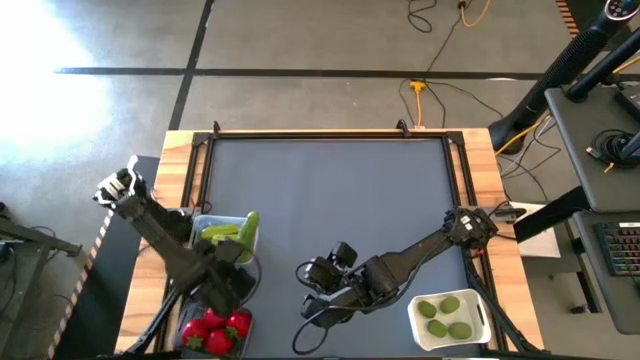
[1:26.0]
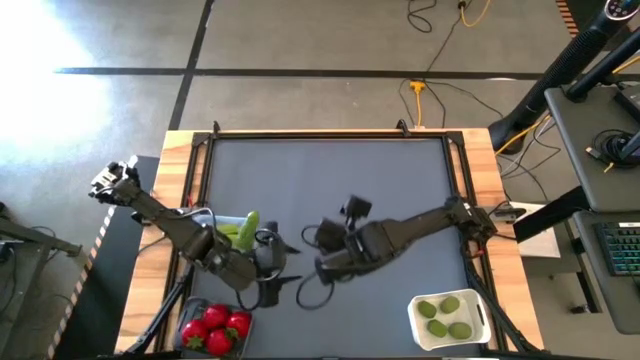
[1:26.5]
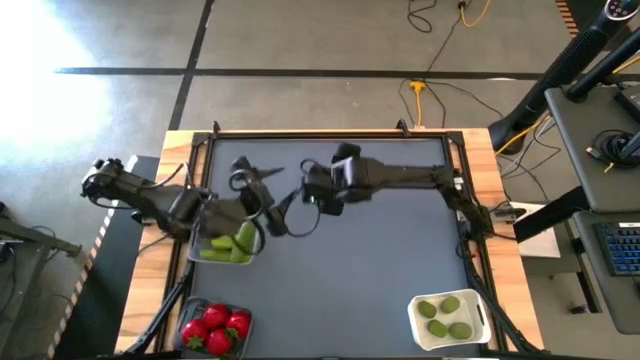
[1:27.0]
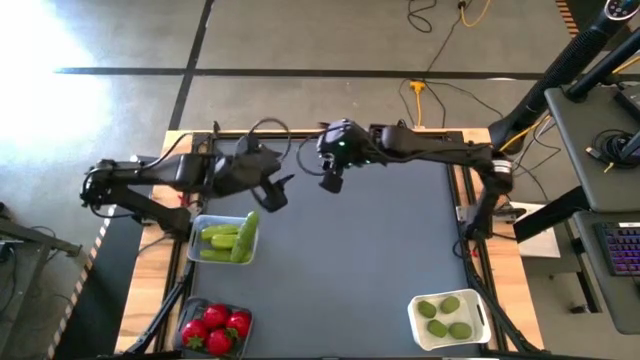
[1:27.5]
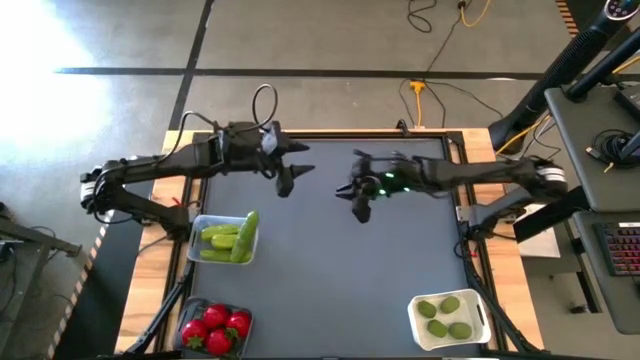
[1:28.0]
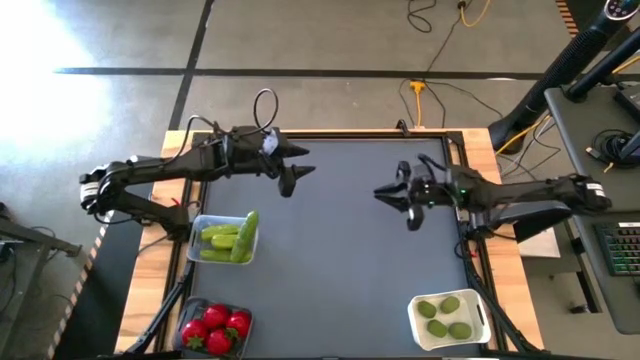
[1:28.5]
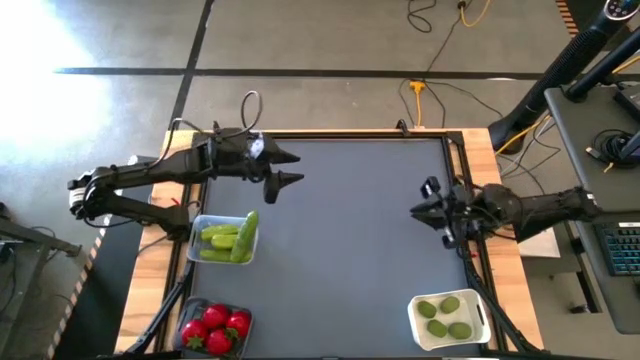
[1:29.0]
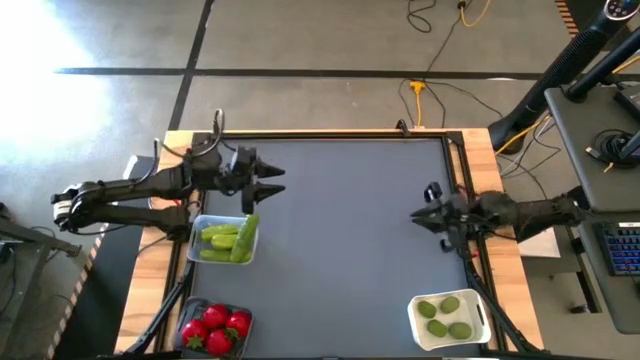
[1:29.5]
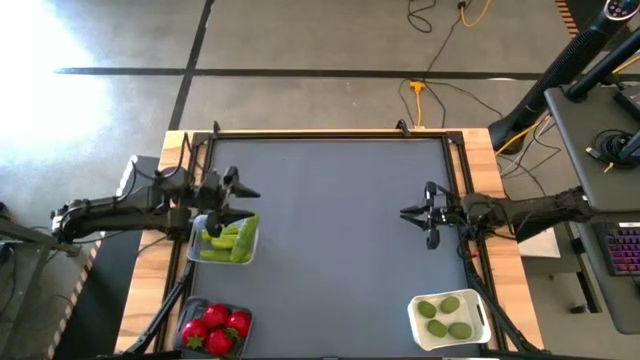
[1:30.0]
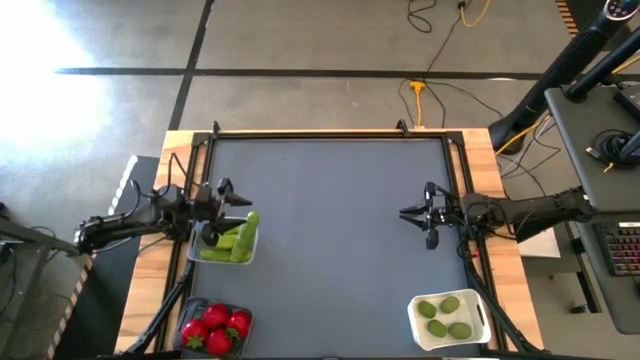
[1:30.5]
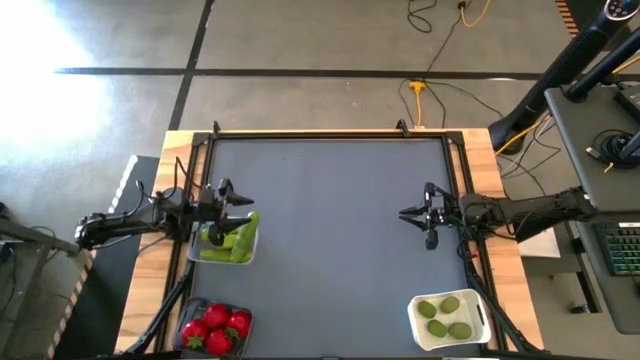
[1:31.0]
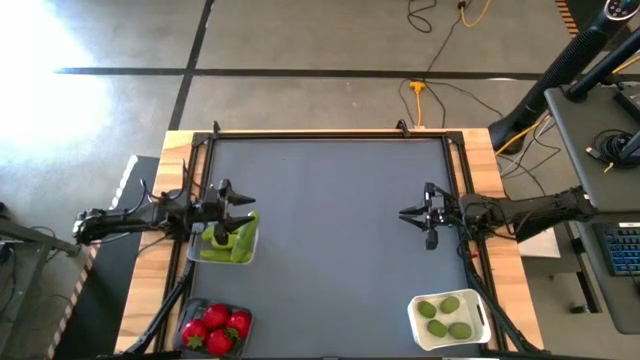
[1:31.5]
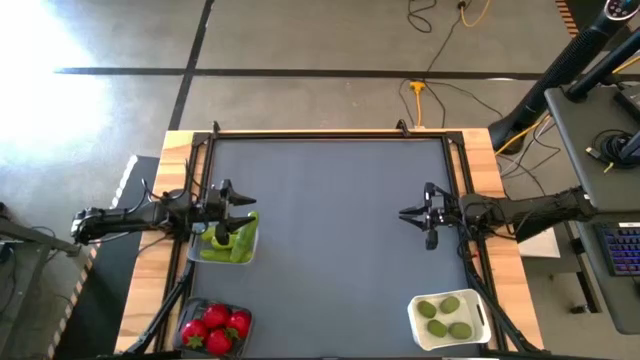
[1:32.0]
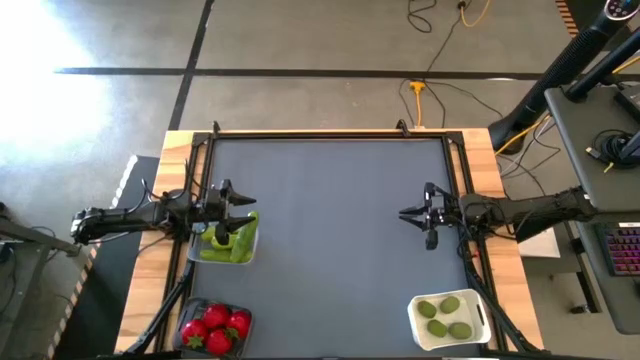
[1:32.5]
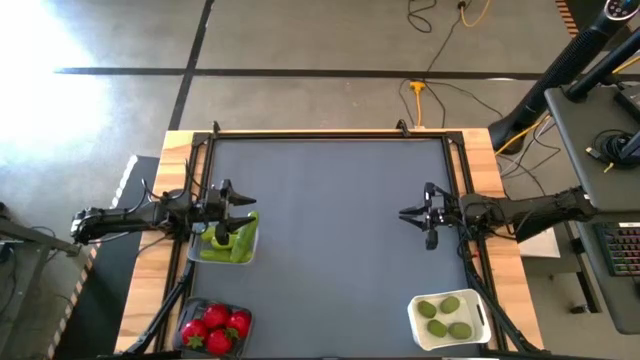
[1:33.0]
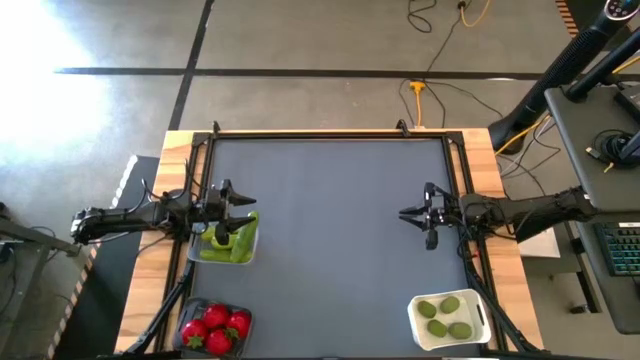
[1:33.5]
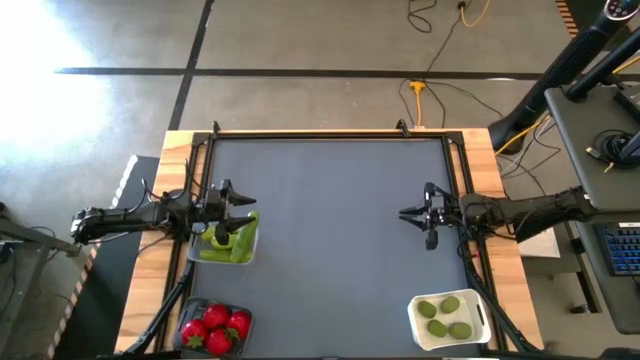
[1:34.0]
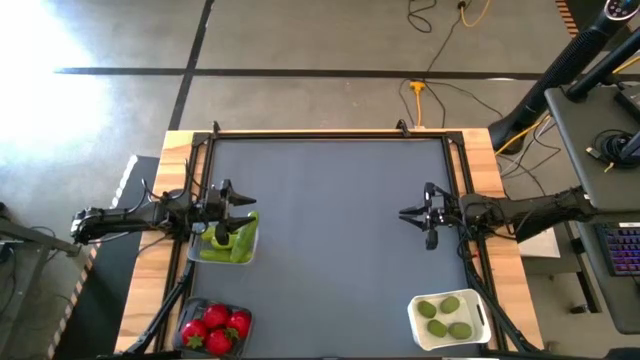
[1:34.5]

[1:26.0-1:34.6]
Task: Sort produce into baskets
Return to Home Position

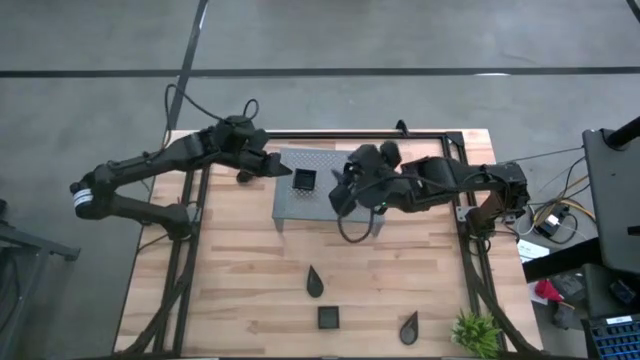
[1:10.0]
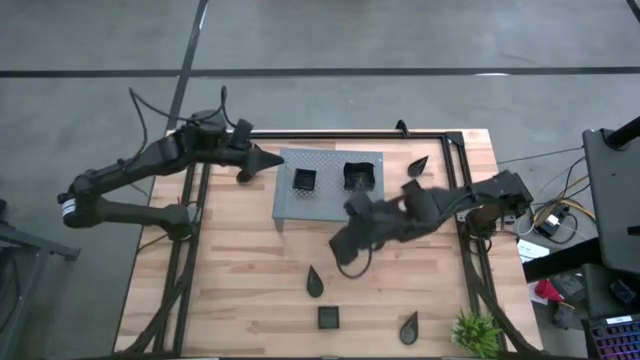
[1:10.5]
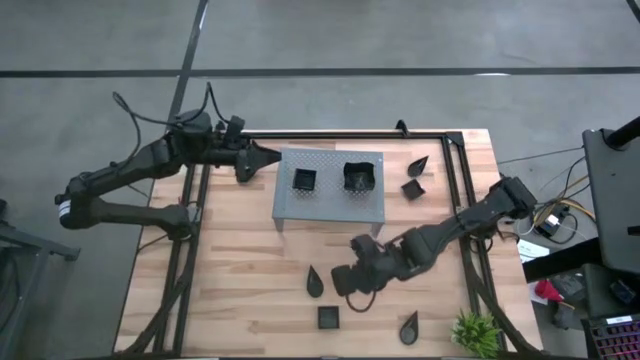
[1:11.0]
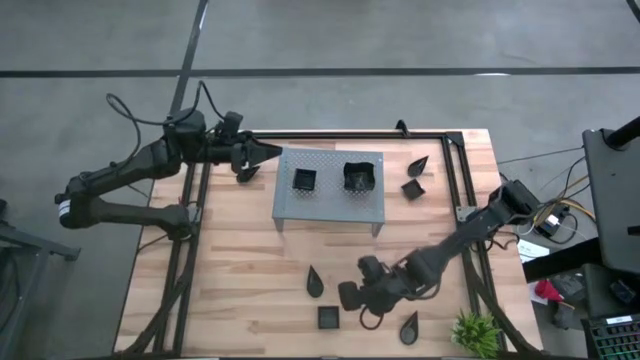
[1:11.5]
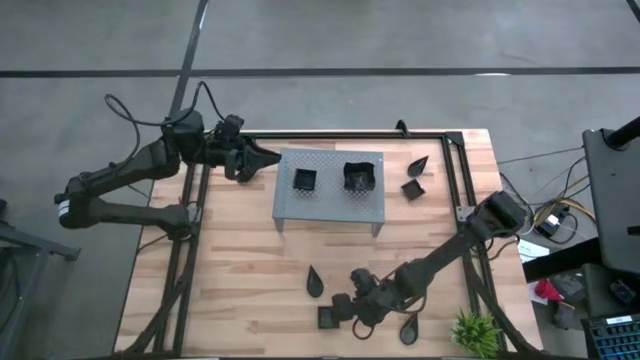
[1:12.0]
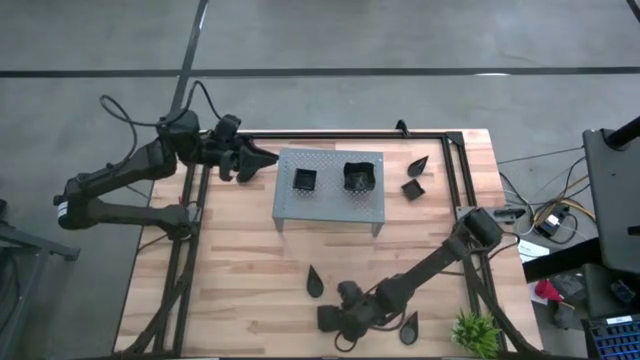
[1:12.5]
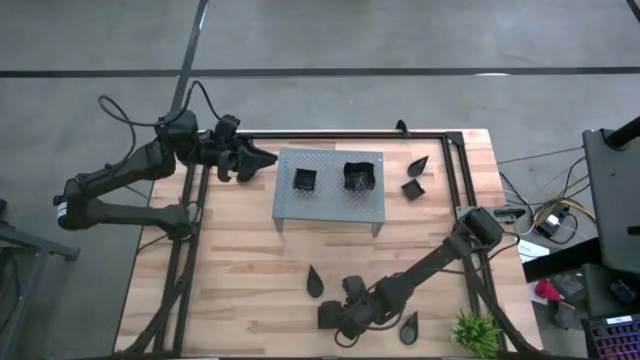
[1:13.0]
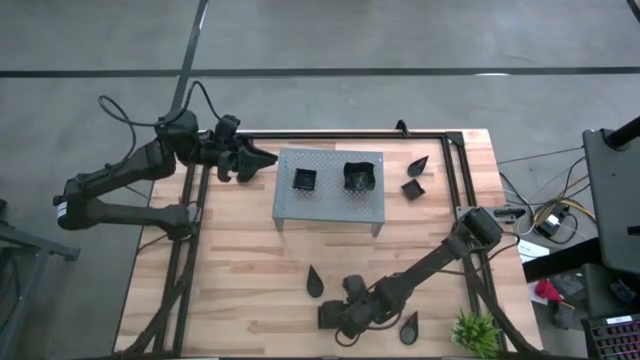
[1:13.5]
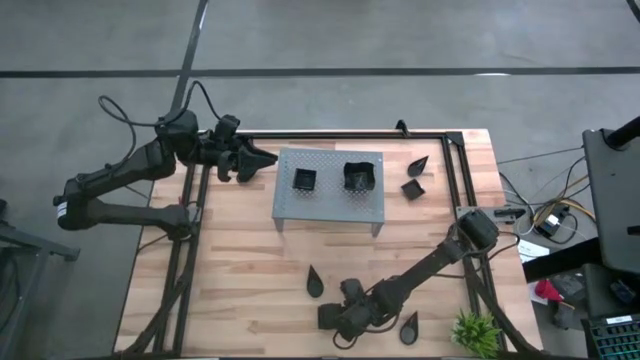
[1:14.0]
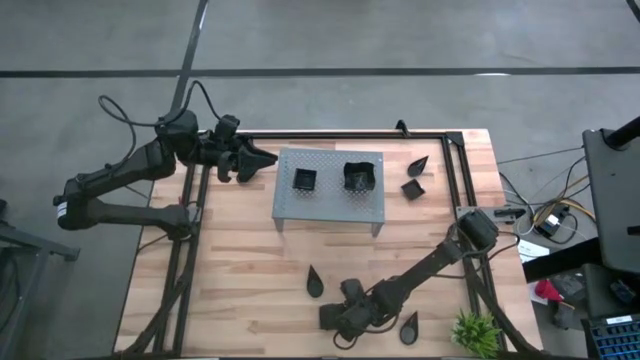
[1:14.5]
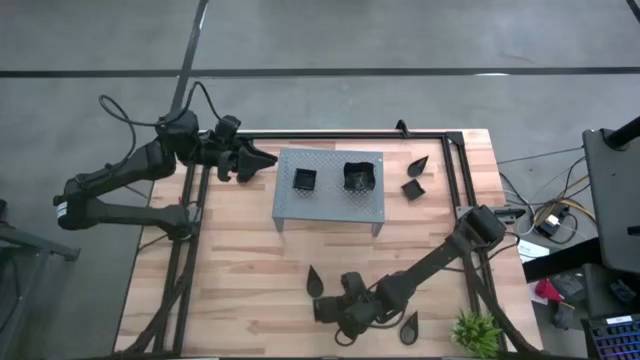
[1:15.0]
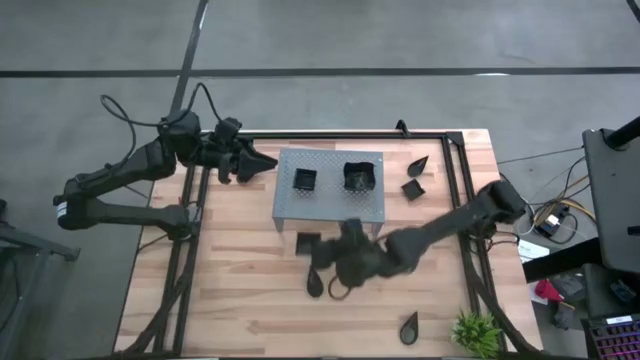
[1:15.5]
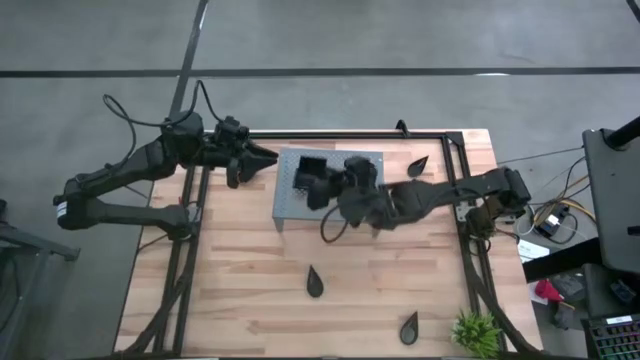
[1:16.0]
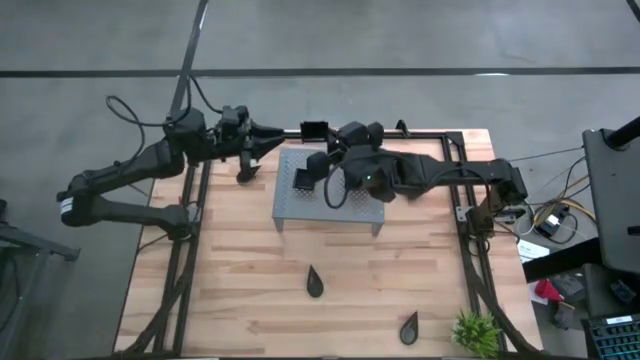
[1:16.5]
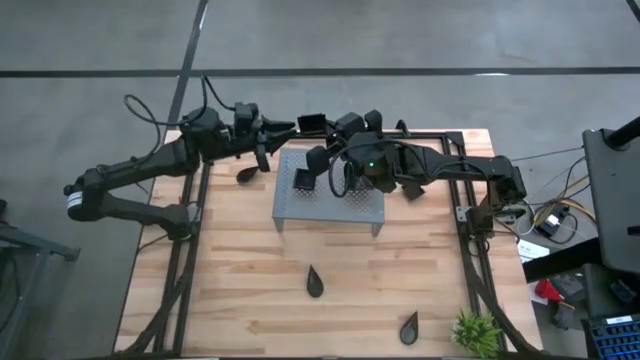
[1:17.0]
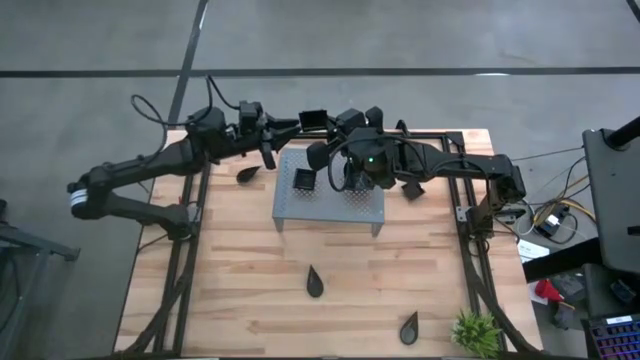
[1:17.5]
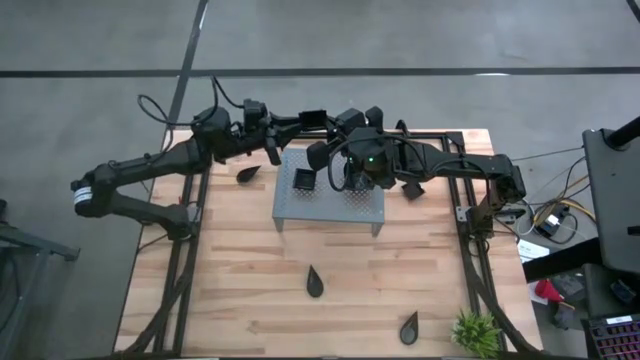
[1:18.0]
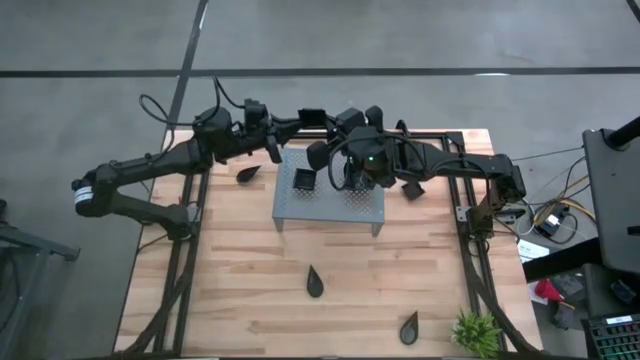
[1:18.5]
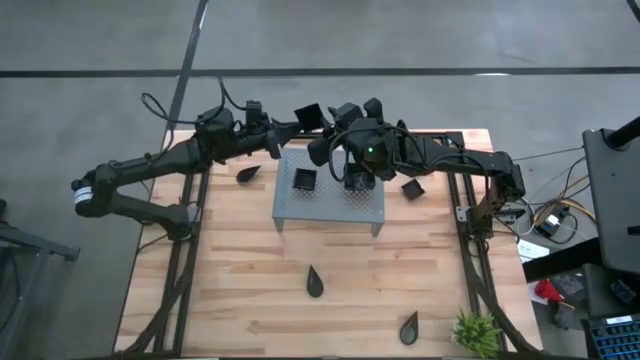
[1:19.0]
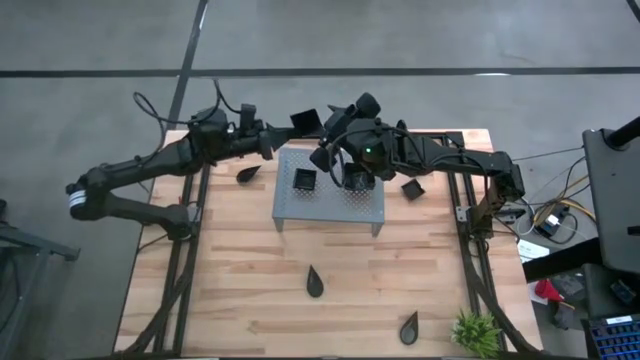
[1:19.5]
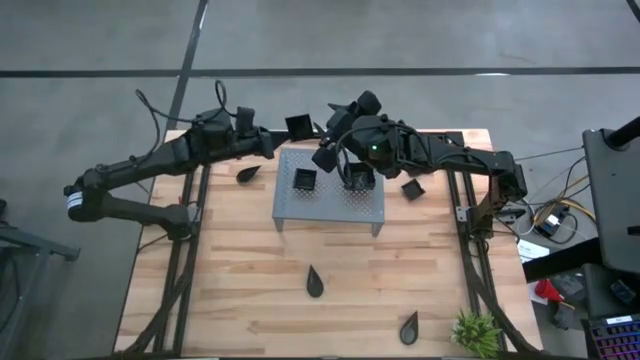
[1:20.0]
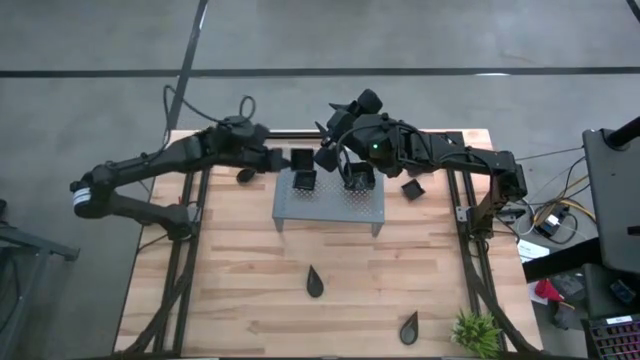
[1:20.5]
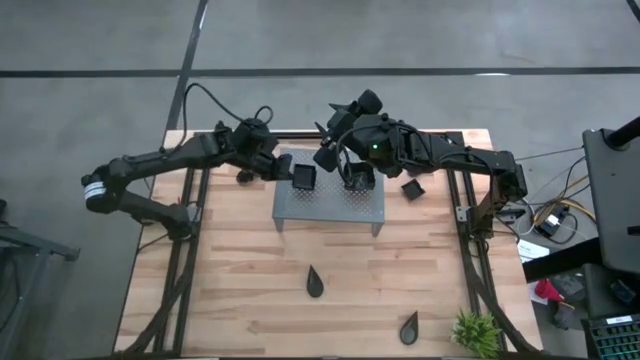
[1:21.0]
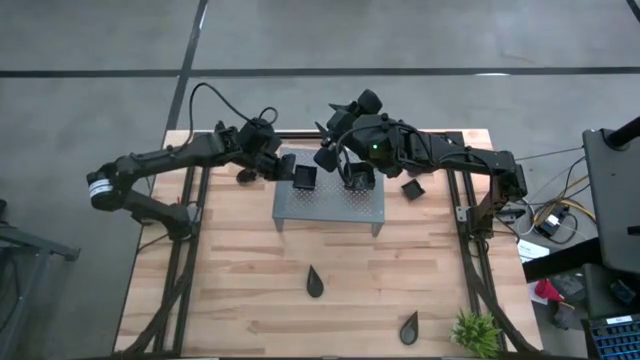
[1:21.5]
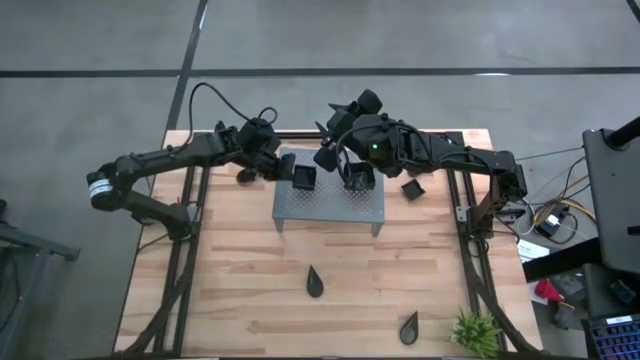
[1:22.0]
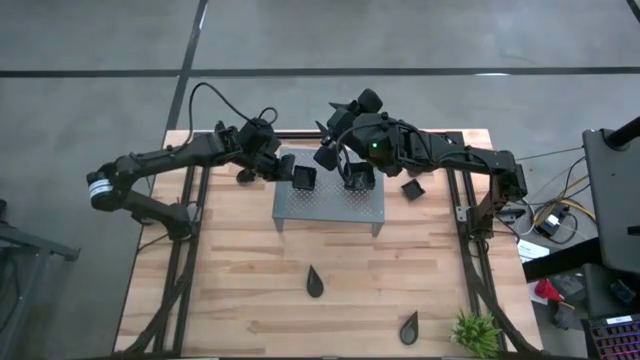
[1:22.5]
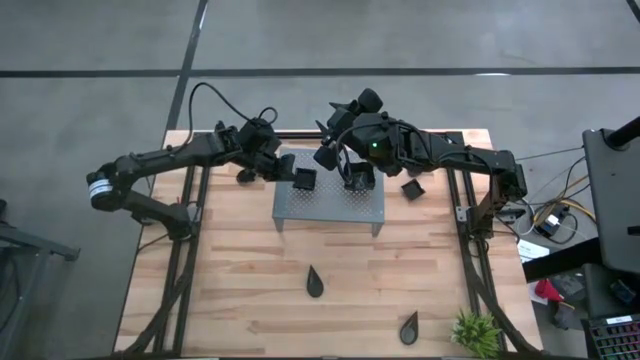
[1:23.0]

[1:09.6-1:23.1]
Task: Pick & Place Mini shaped plates
Stack the black square plate on top of the other black square plates on the shelf
